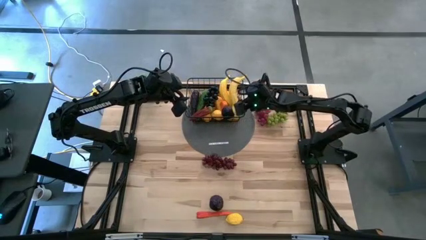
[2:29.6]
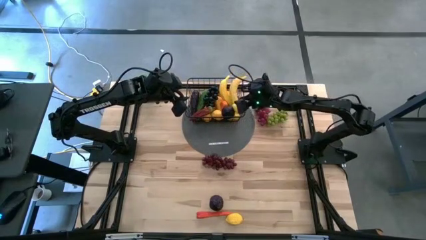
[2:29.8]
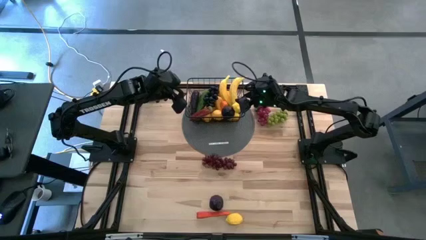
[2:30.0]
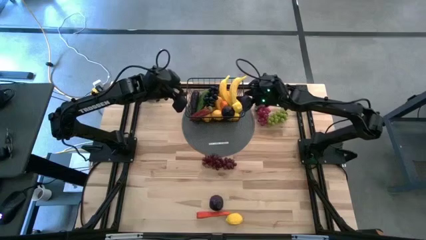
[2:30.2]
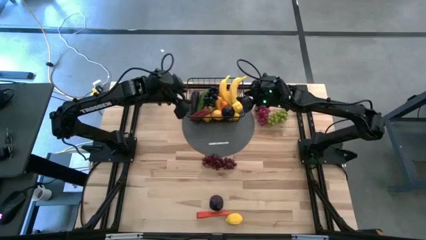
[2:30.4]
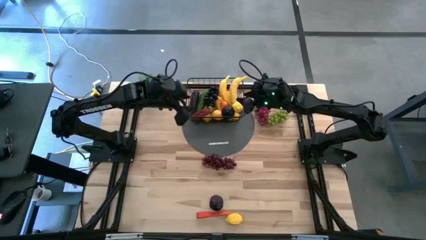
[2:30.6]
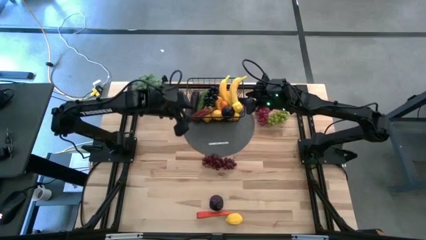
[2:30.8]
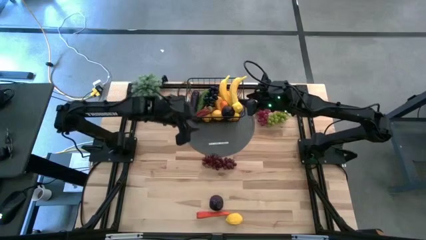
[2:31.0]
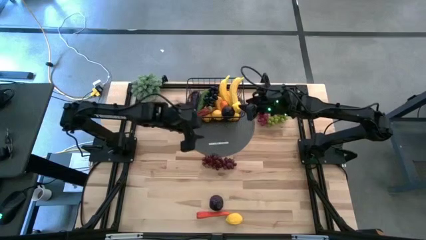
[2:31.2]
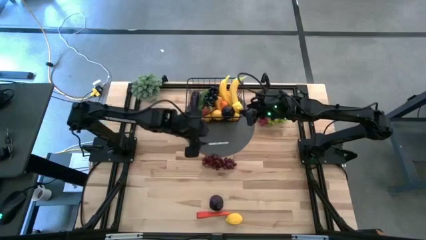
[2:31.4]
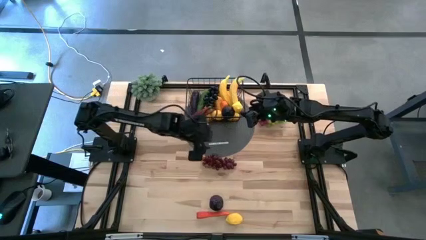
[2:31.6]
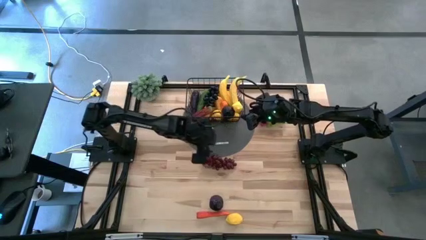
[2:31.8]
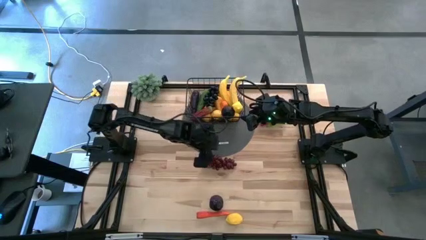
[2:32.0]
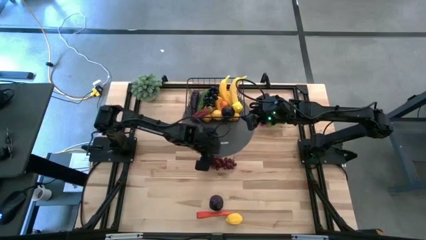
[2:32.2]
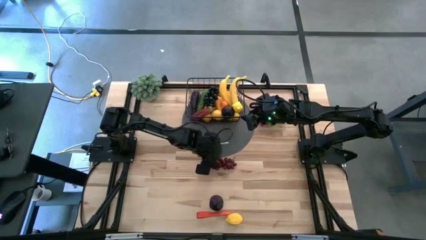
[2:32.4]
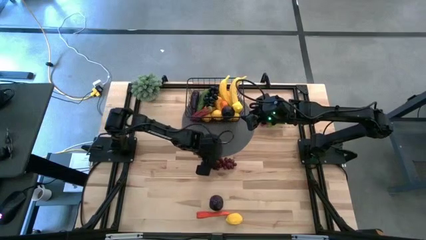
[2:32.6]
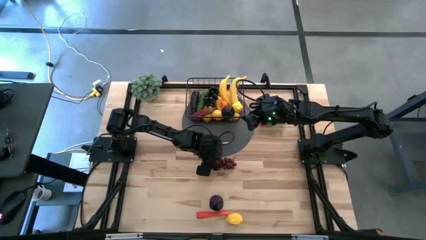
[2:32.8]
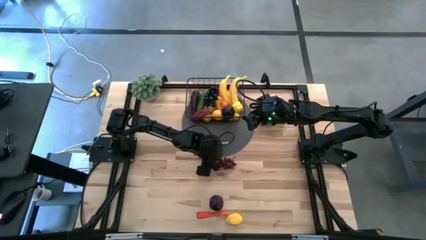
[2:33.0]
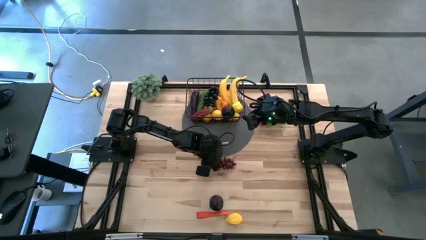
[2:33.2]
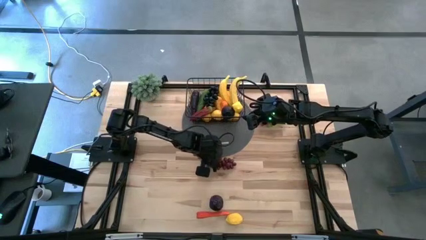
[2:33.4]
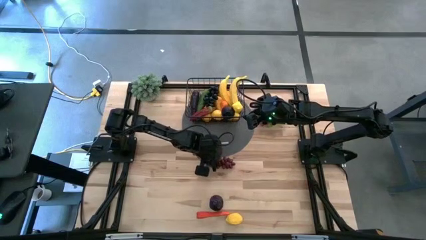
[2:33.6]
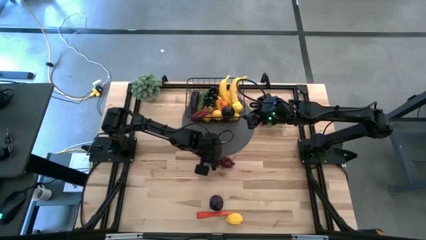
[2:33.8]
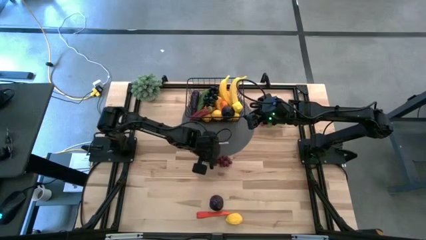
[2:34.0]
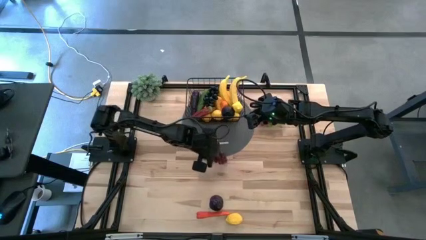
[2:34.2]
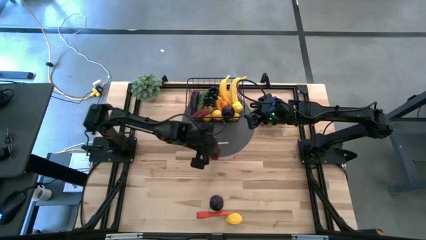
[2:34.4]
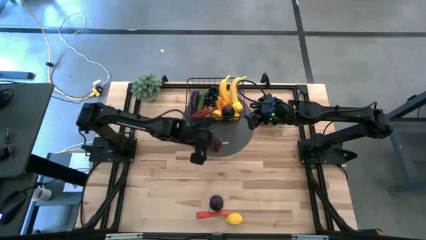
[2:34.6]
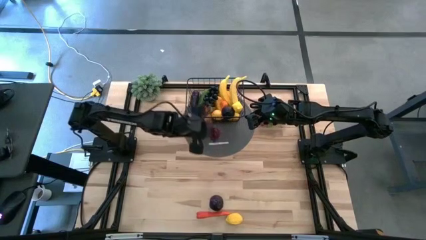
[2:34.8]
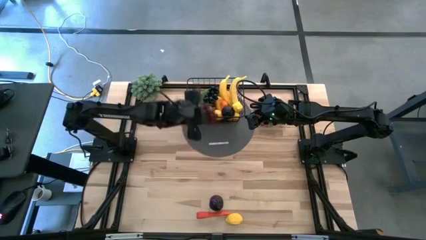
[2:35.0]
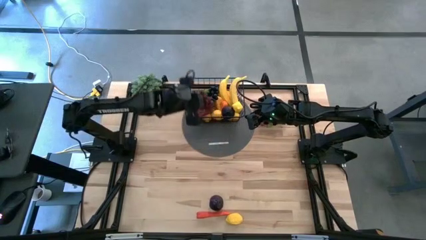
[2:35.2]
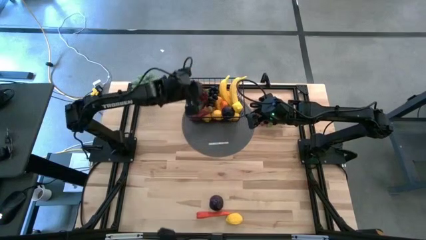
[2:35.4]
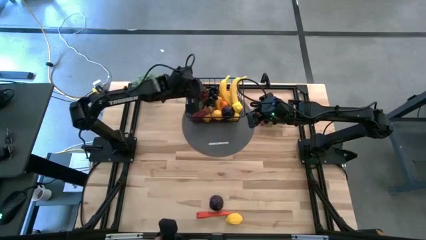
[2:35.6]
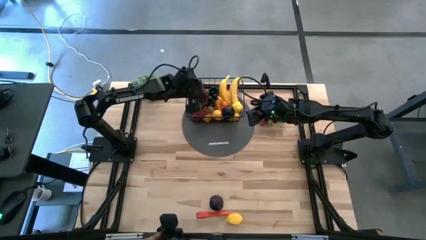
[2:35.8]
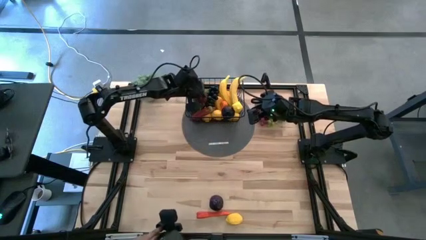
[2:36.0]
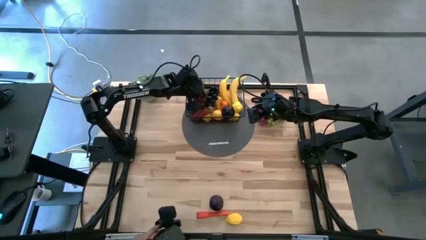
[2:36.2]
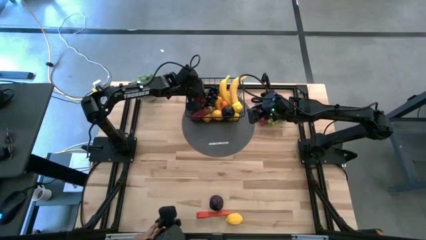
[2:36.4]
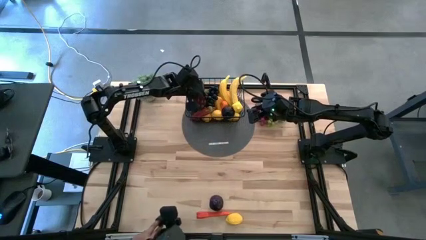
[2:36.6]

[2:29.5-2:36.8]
Task: Build produce basket
Put the bottom purple grapes into the black wire basket

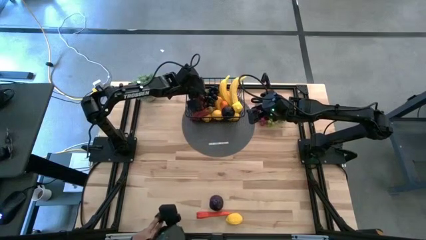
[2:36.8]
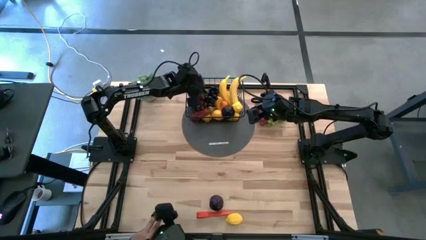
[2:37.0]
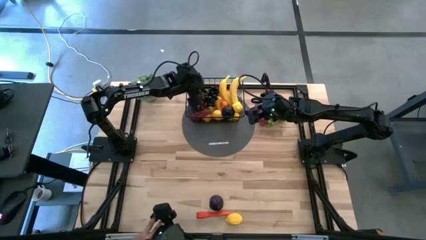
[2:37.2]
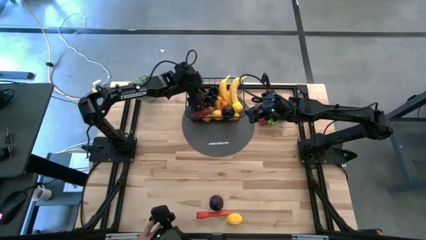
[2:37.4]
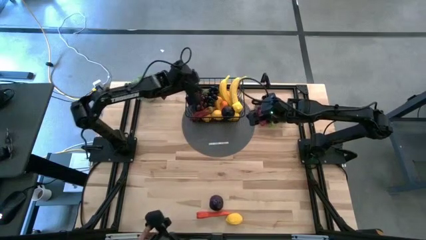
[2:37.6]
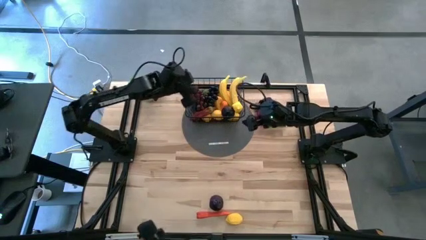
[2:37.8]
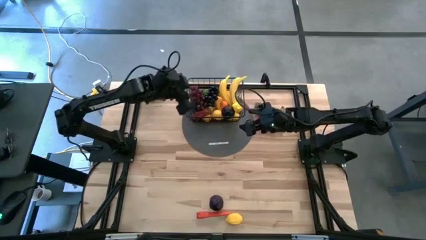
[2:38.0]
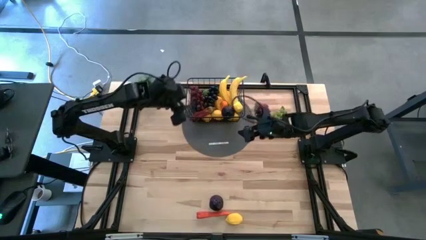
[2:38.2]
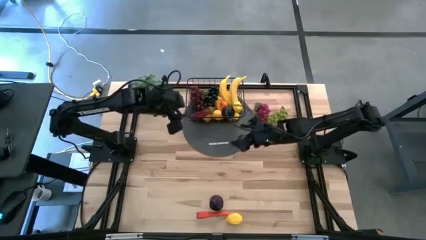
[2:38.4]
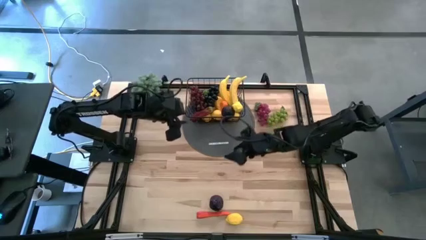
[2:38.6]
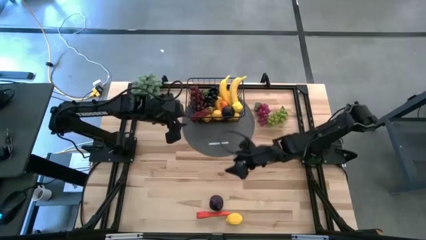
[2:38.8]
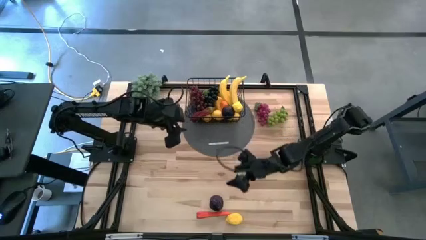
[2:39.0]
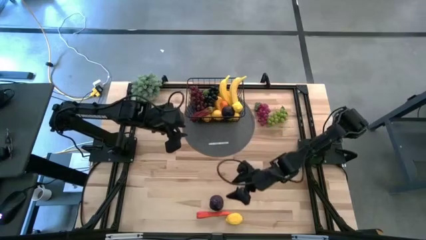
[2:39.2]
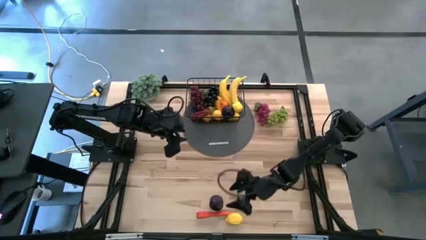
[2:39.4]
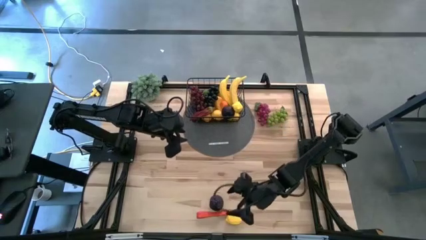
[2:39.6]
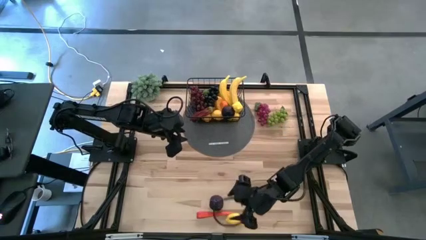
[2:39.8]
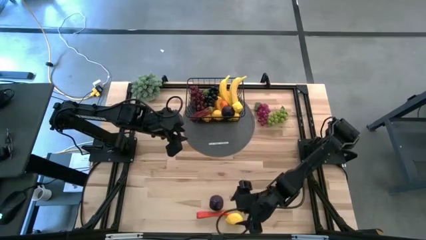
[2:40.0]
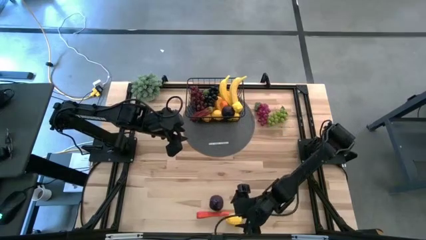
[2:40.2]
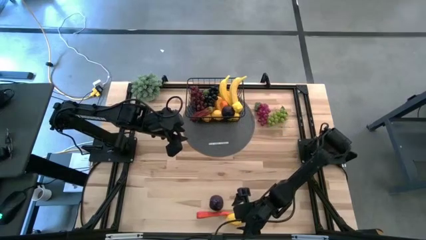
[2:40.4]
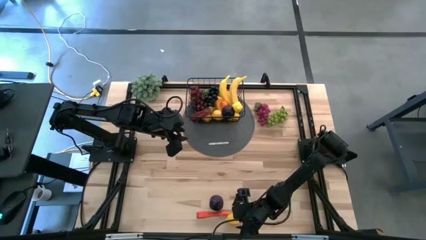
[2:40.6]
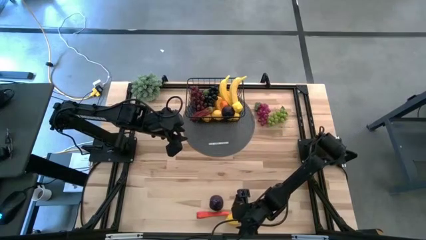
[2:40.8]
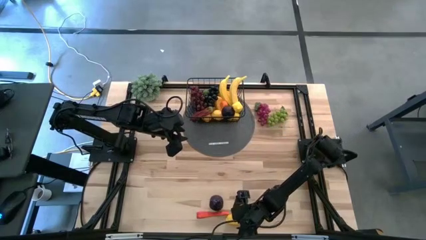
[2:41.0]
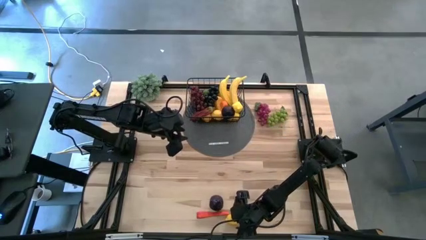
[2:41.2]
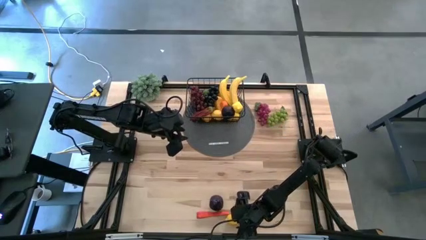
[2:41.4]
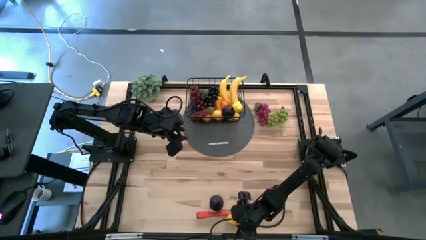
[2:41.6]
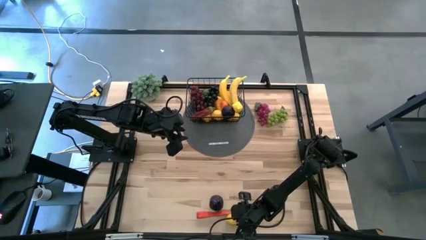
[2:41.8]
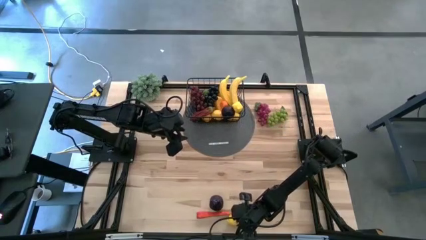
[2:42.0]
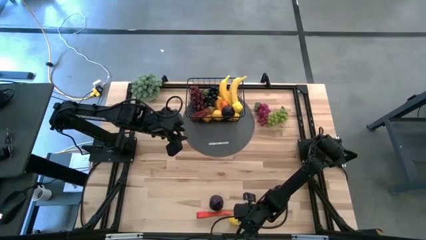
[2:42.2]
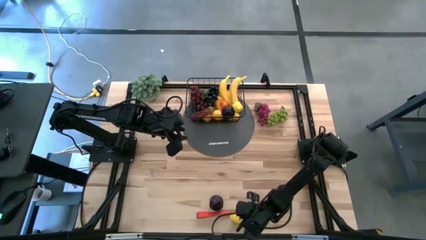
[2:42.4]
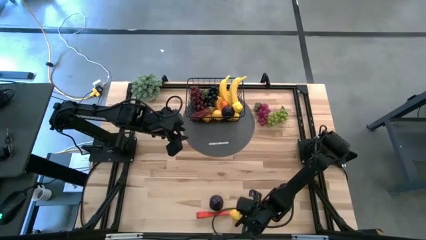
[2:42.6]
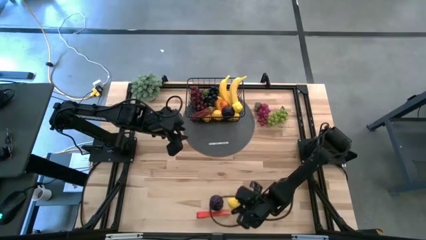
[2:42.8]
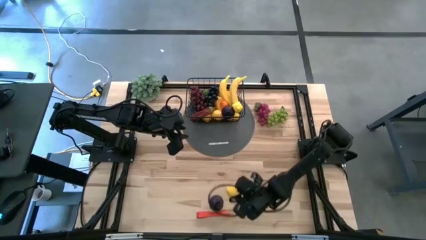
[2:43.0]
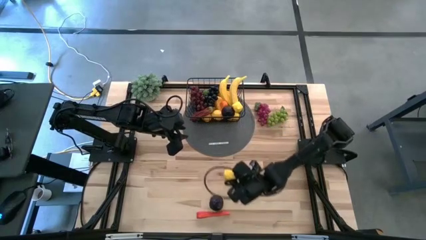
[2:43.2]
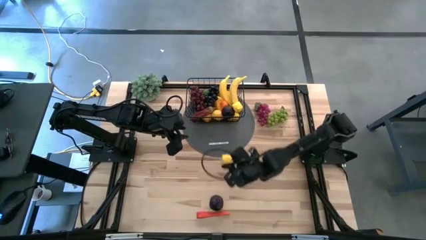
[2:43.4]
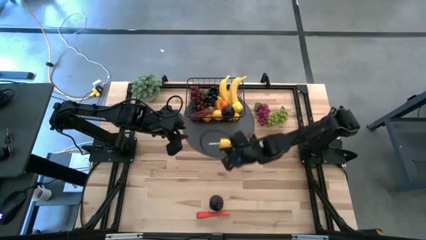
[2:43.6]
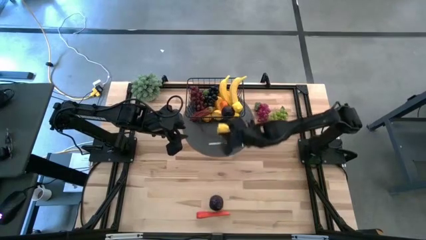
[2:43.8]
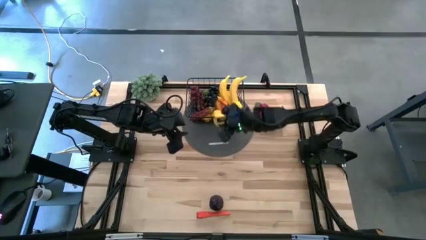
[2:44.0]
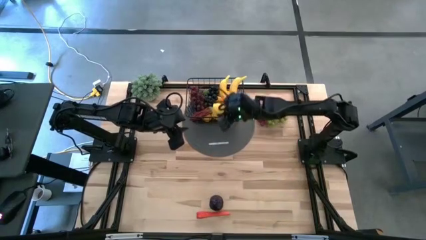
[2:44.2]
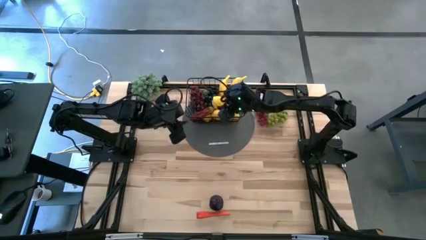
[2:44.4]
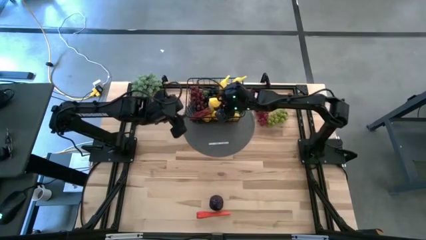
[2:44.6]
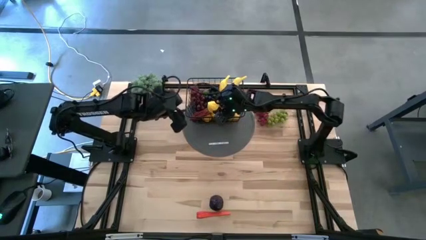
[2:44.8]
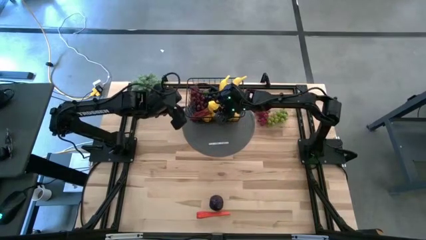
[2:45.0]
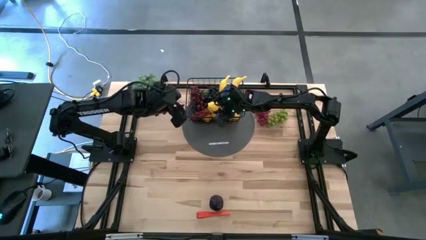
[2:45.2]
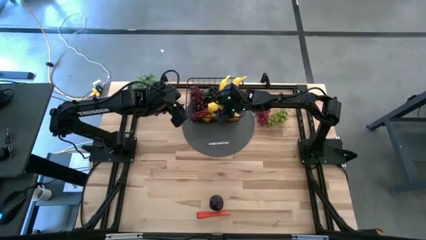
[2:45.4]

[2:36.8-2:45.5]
Put the yellow lemon into the black wire basket
